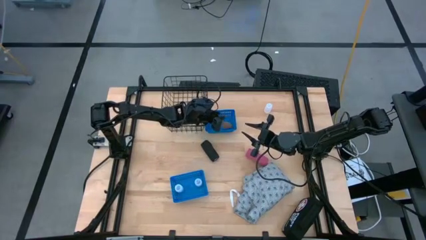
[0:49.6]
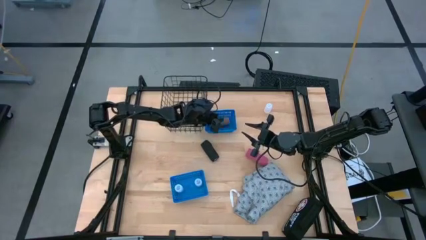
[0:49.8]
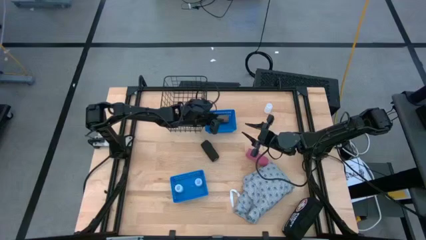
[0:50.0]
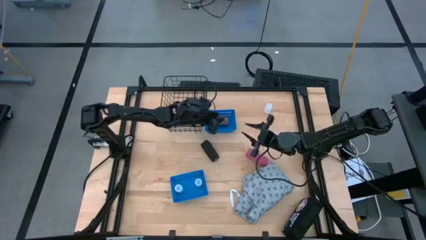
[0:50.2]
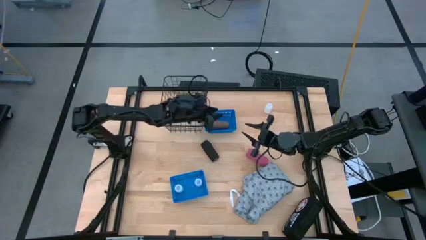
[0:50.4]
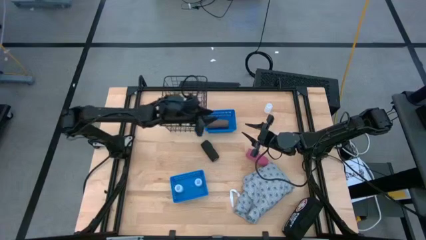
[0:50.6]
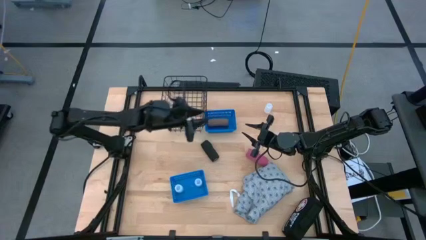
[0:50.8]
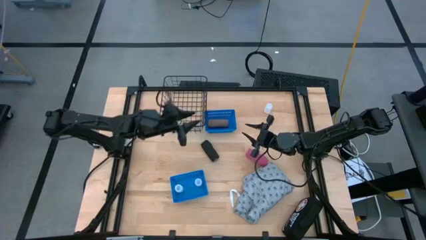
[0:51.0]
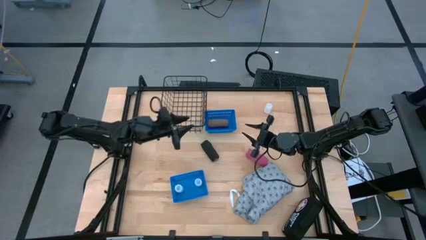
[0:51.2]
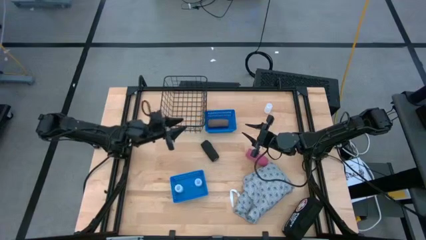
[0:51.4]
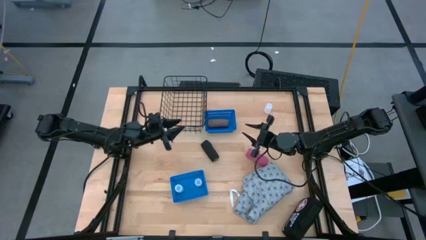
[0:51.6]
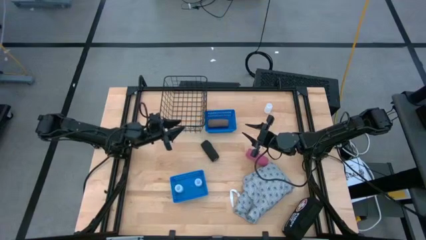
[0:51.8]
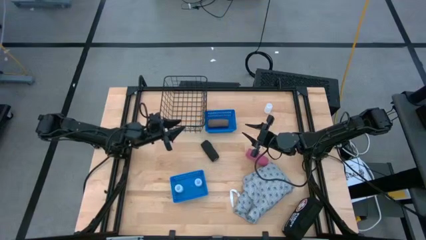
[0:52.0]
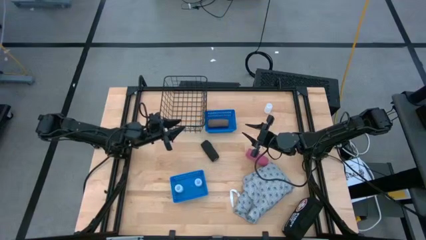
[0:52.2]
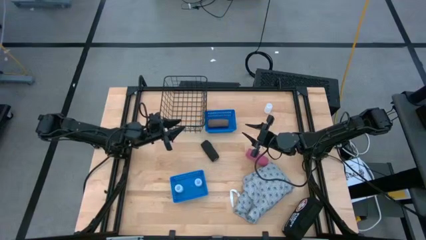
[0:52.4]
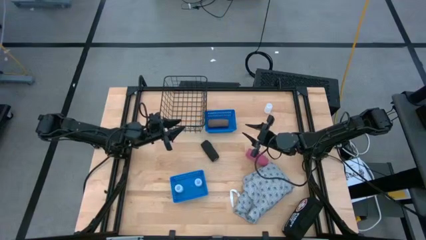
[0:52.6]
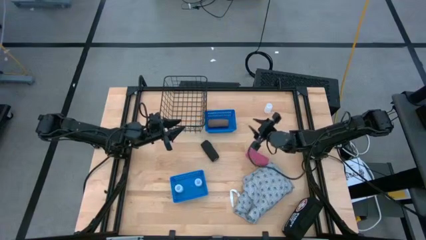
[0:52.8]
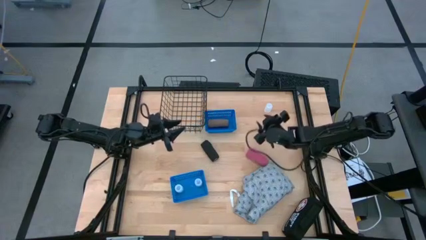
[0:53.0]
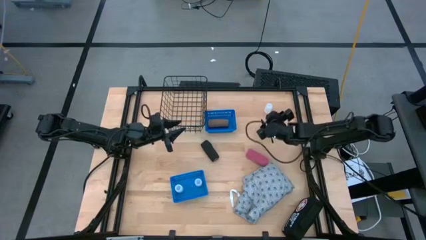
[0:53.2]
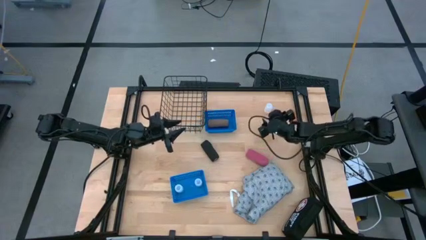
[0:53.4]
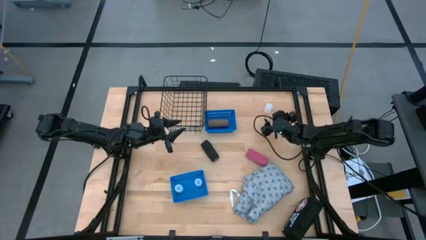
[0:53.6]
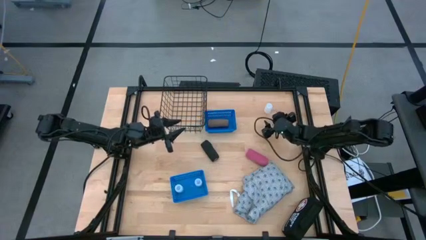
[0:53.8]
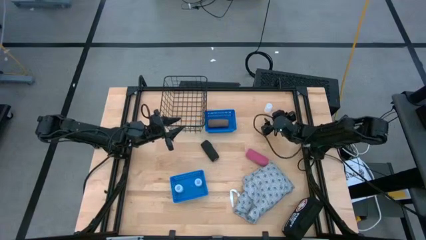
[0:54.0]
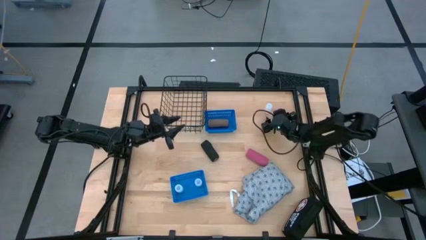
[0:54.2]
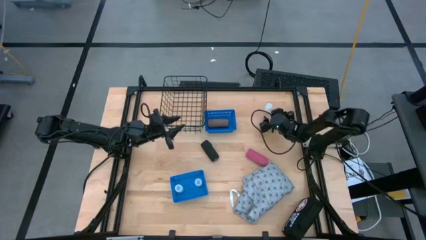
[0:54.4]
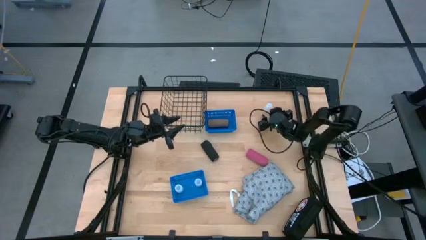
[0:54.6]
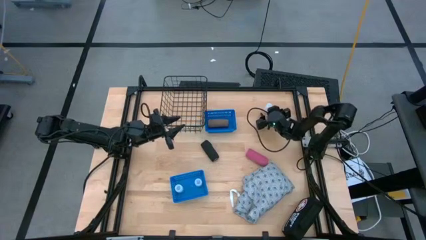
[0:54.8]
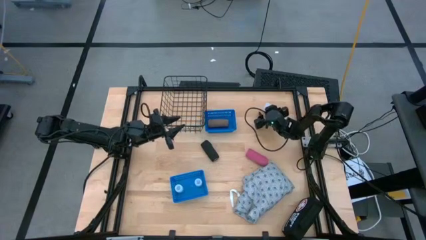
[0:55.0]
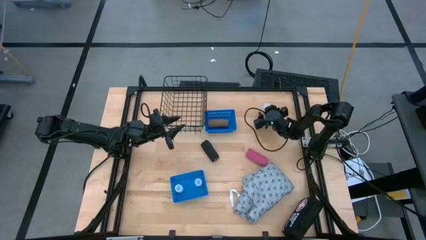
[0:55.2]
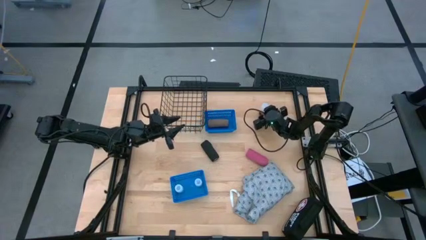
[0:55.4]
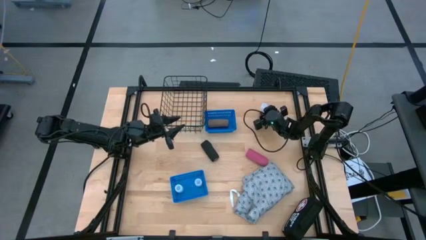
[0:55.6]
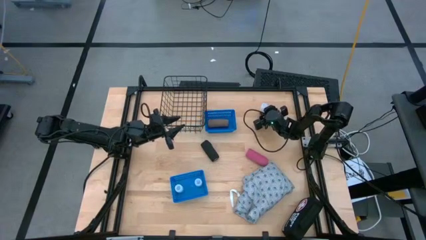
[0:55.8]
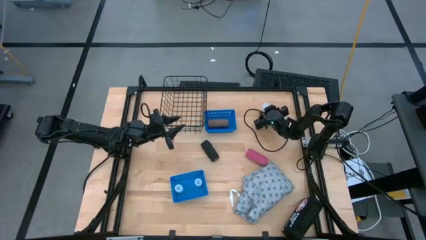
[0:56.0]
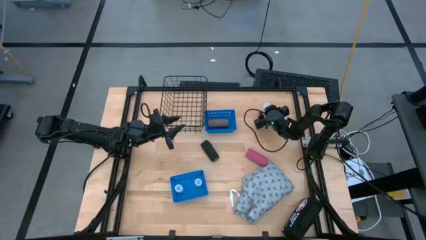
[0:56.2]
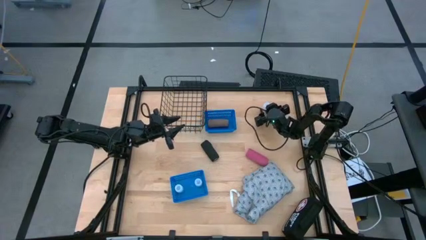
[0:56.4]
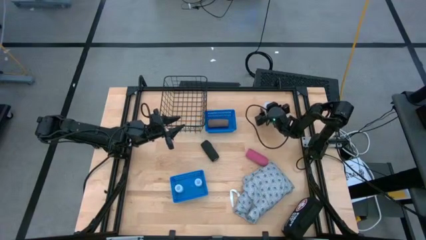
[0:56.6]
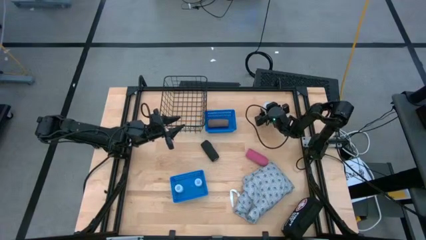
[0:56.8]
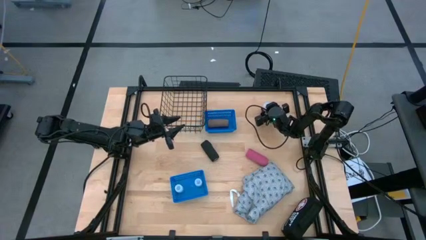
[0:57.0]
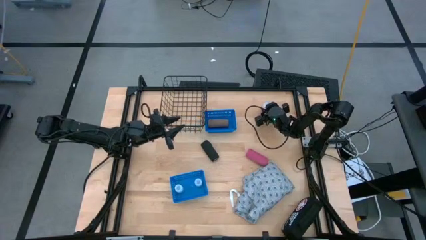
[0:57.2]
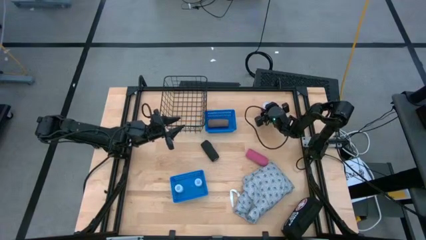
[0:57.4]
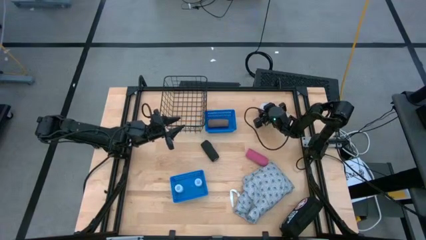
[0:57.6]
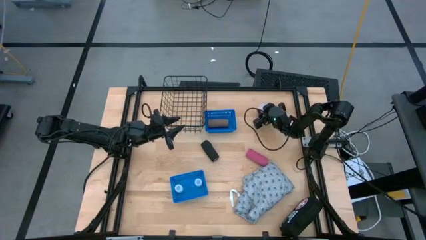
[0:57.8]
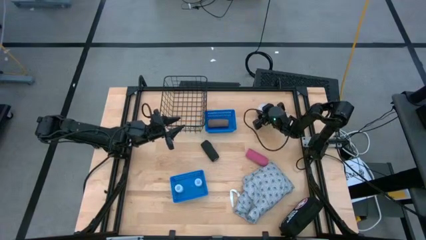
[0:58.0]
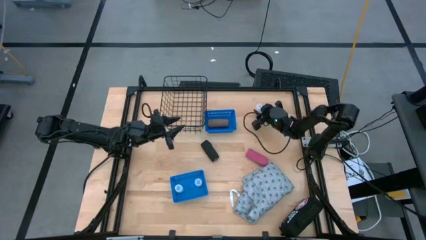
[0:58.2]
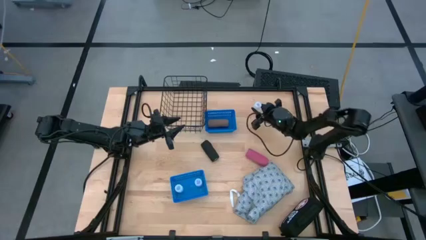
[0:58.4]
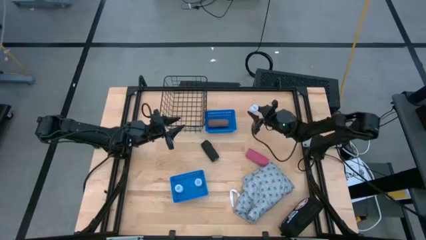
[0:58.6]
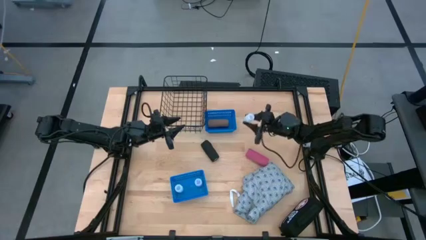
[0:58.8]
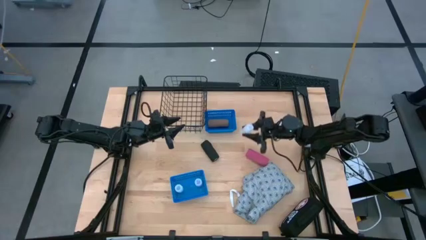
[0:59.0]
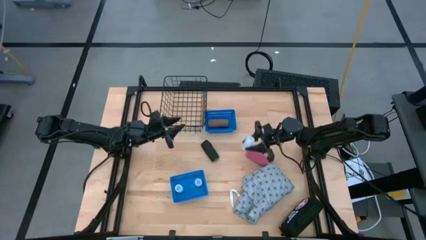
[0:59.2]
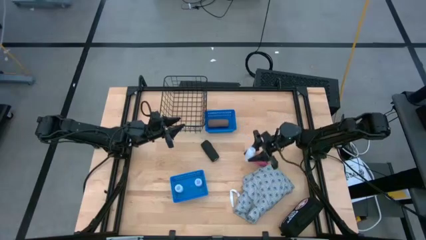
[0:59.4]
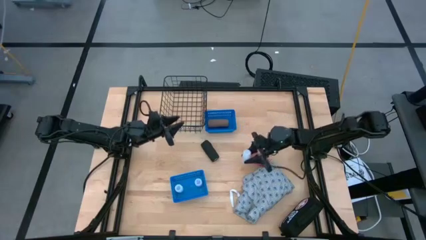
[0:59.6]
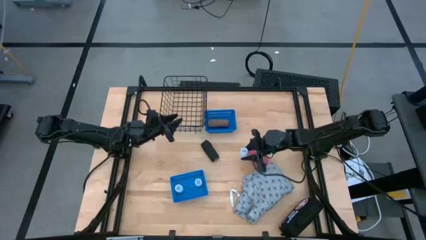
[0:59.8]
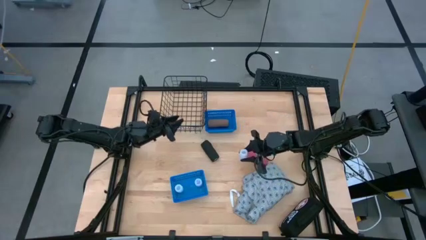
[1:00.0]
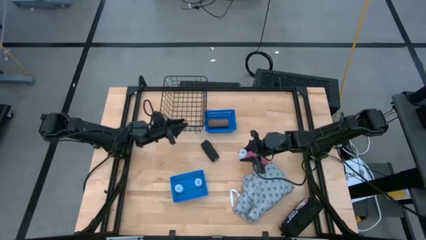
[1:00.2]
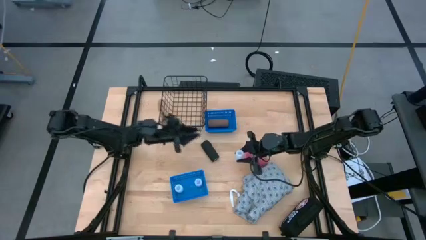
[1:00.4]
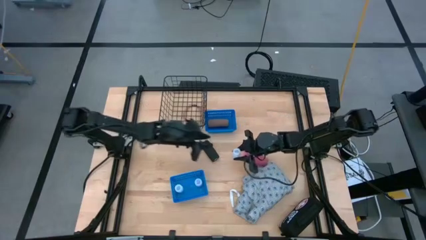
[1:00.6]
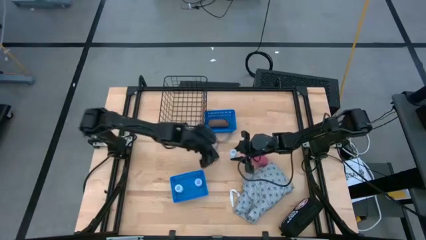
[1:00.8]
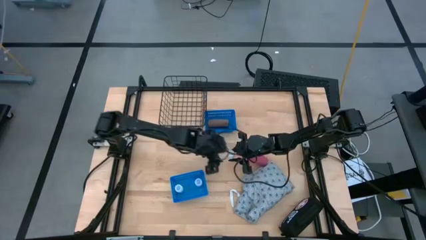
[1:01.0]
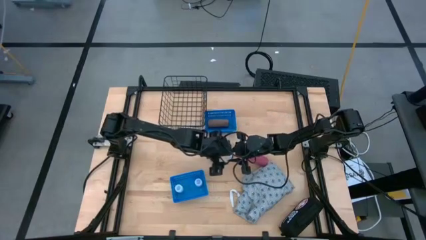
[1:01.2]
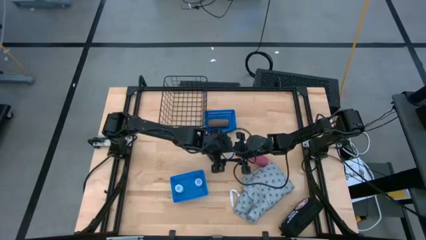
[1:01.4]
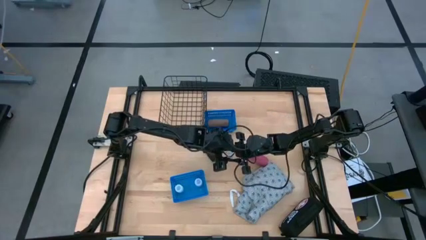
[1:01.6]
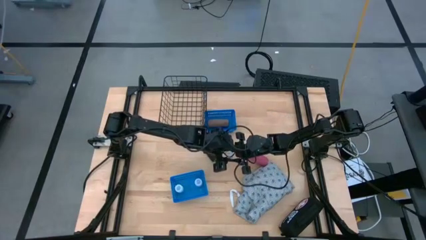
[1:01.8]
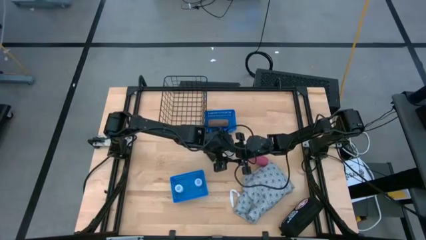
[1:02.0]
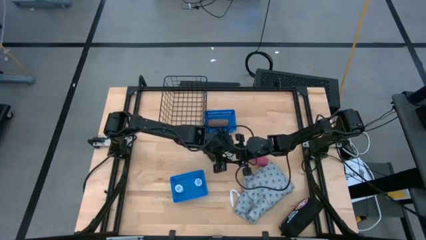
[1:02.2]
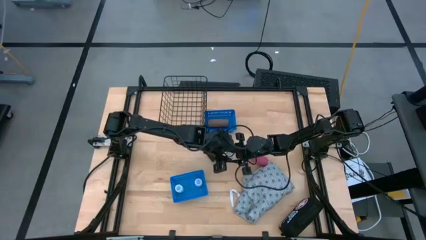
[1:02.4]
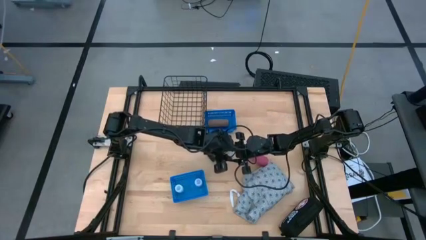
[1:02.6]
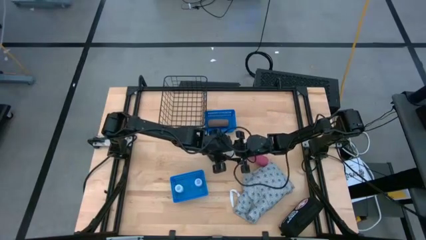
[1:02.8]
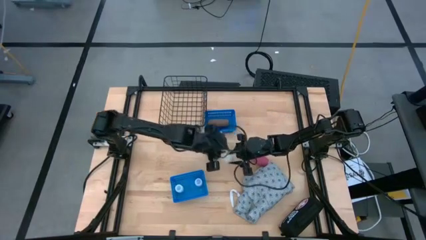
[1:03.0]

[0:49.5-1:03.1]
Task: Pick & Place Medicine items
Put the white medicine bottle into the bottom blue basket
